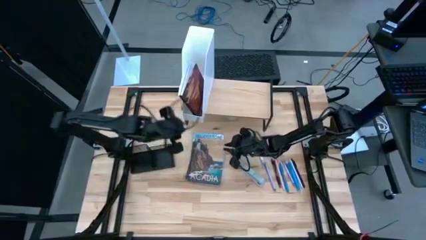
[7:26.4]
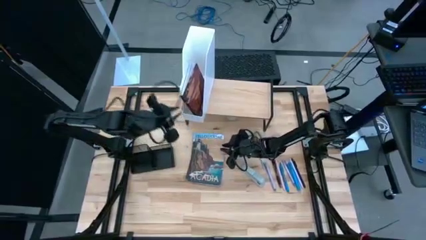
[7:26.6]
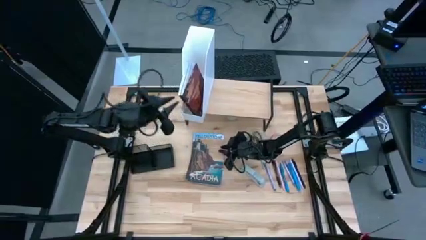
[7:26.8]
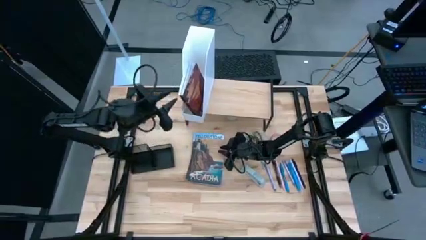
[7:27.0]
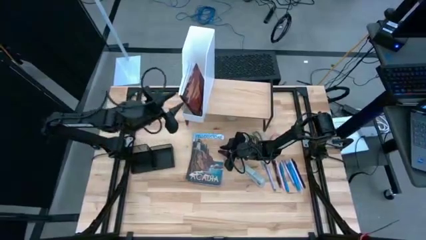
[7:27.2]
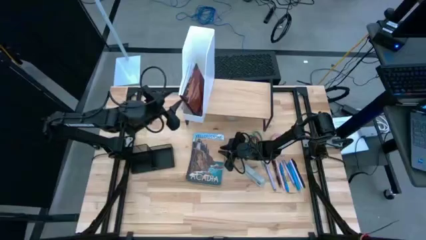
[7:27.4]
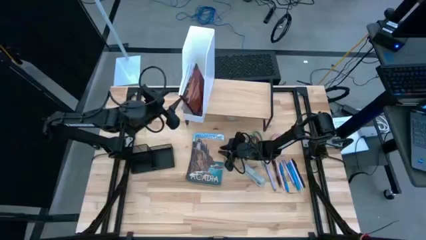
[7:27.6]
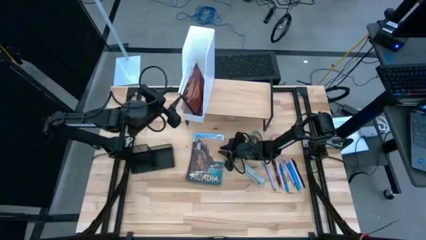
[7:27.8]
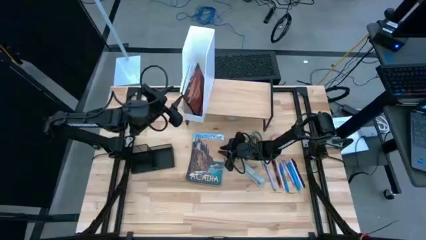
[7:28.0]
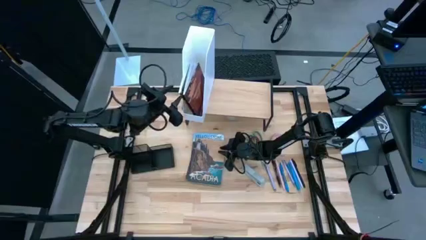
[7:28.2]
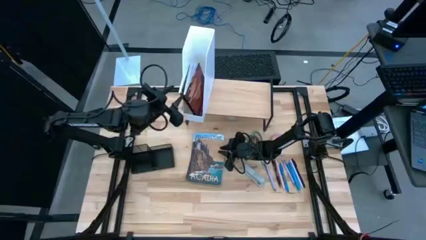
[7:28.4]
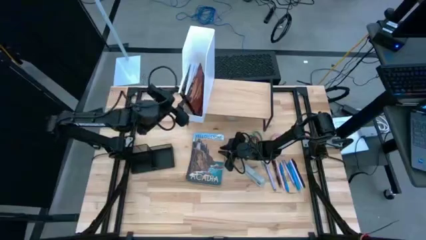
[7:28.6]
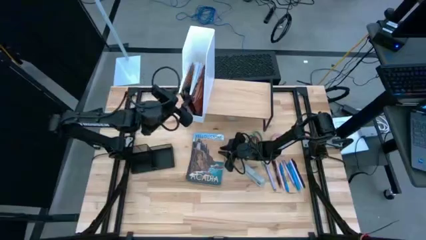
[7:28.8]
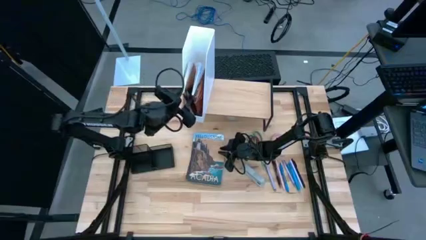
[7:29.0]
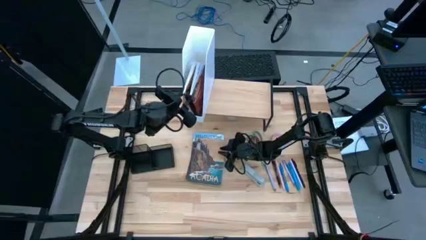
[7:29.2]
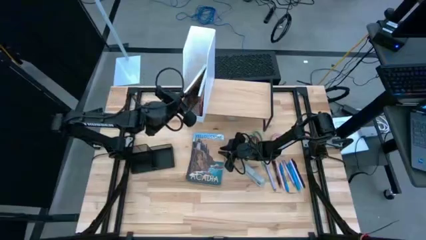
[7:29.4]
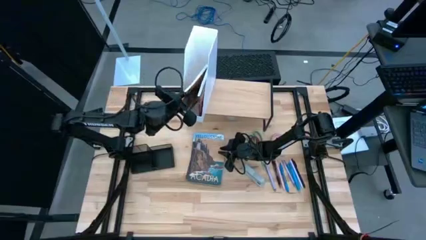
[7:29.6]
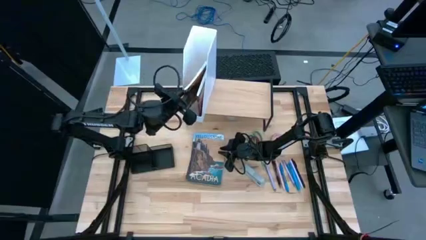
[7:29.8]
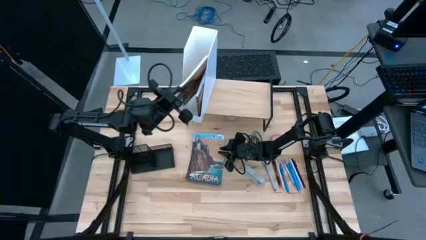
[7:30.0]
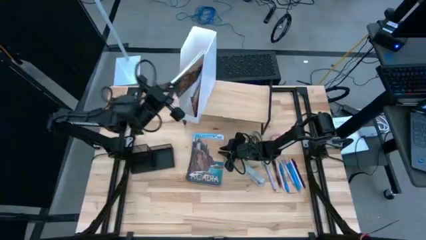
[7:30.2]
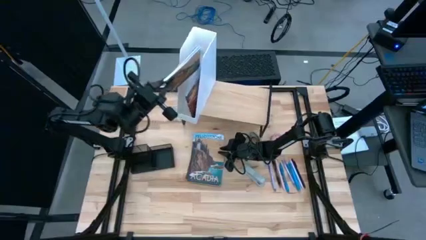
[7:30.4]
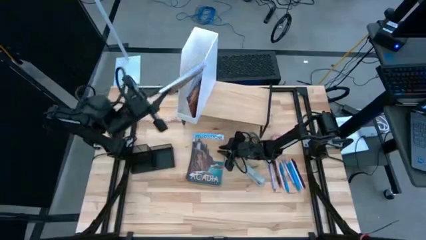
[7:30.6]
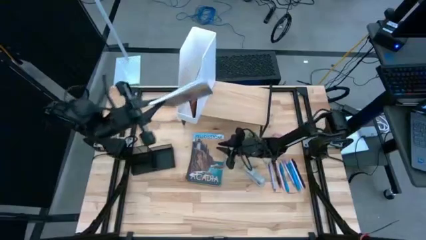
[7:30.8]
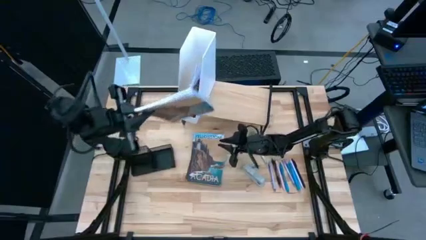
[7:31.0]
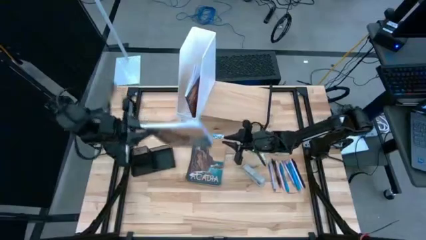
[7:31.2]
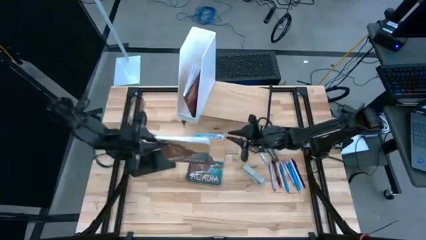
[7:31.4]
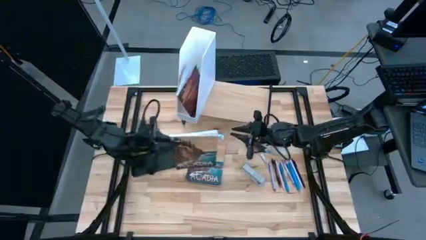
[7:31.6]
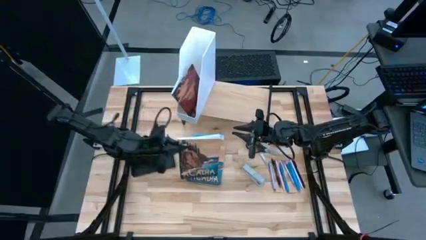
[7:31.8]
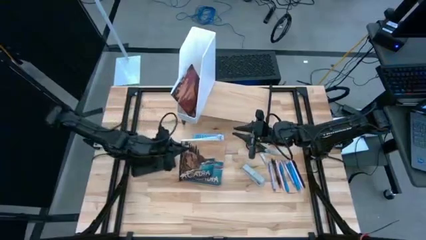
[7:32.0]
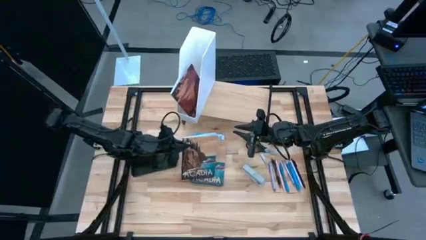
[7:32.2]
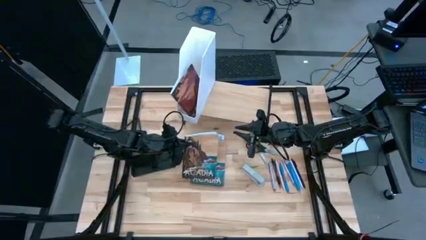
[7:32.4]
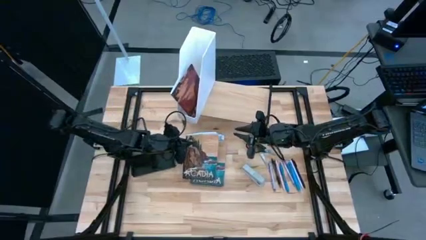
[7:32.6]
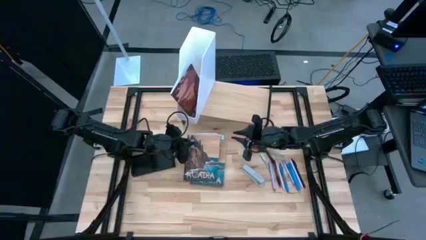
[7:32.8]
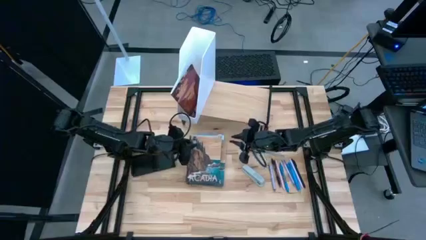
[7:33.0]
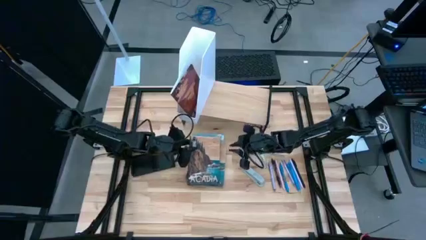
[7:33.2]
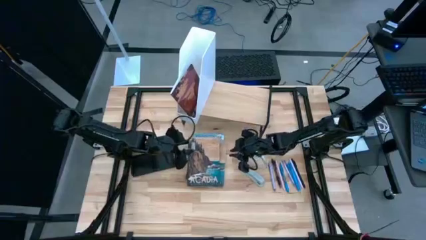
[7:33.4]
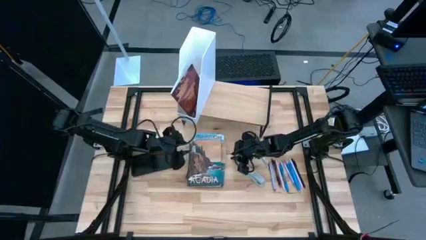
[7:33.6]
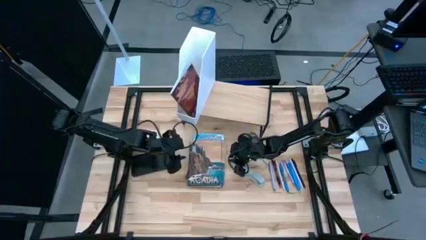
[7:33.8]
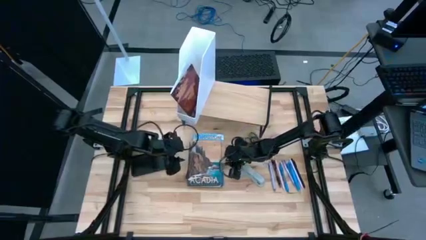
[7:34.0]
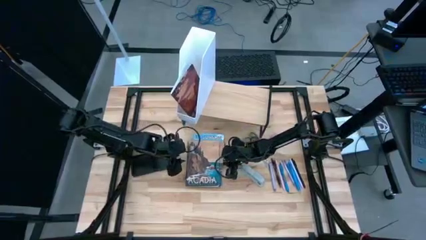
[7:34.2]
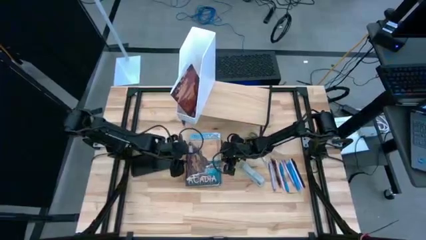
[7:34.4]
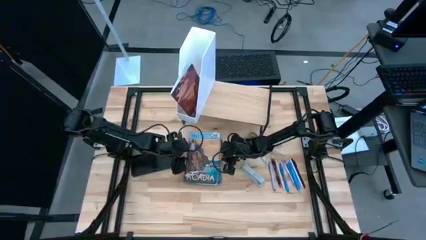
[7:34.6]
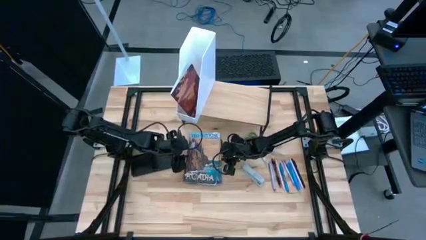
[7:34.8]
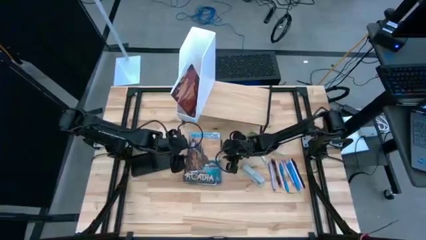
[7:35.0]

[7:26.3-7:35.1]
Task: Stock shelves
Remove the brown book from the white bookshelf on the shelf

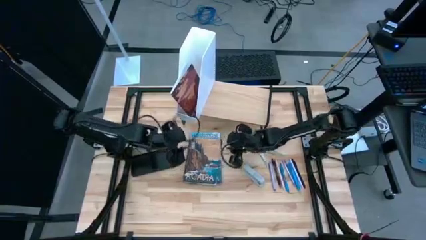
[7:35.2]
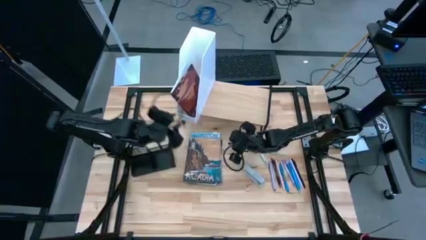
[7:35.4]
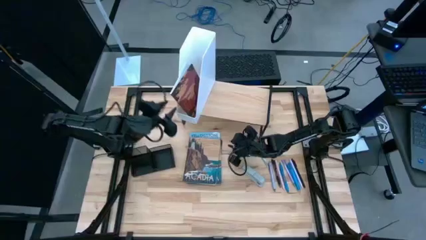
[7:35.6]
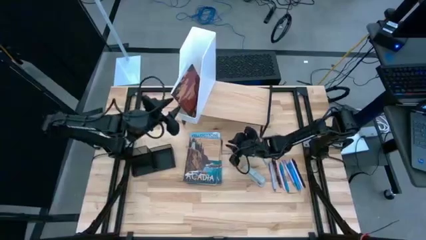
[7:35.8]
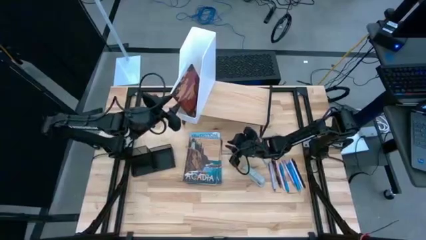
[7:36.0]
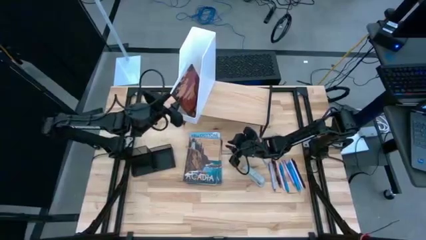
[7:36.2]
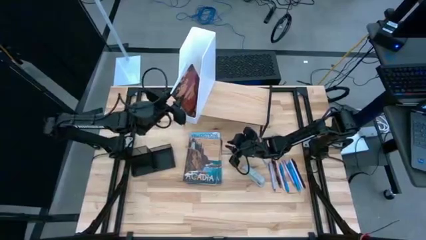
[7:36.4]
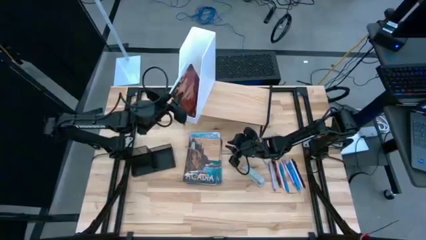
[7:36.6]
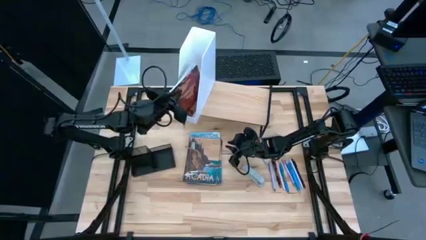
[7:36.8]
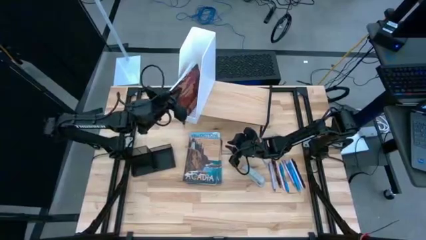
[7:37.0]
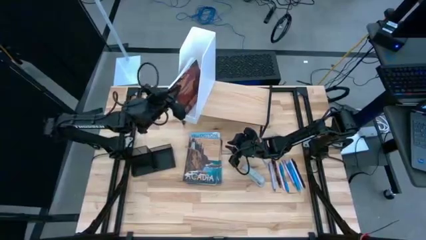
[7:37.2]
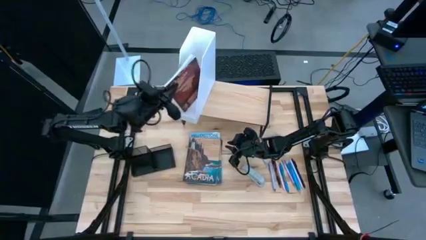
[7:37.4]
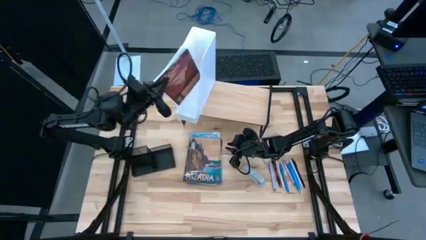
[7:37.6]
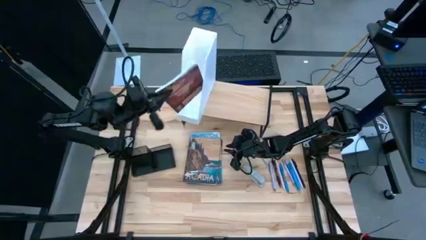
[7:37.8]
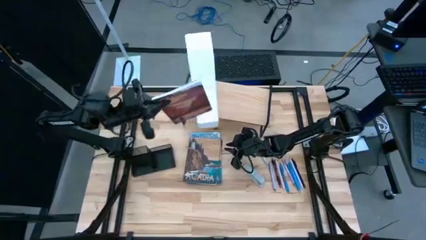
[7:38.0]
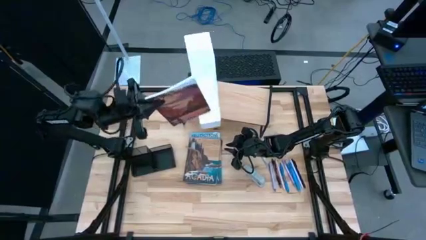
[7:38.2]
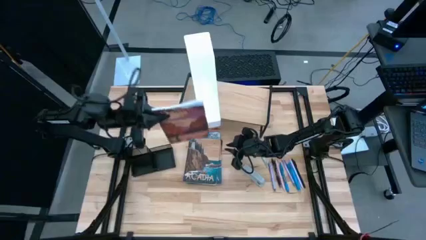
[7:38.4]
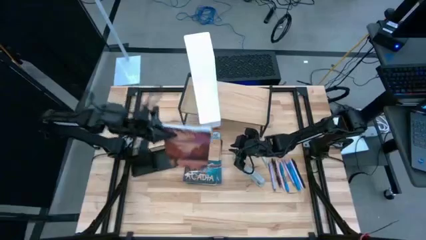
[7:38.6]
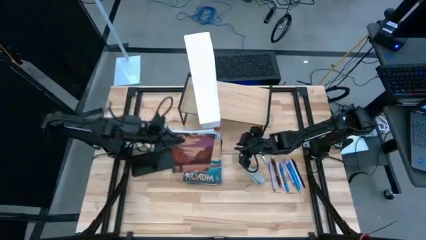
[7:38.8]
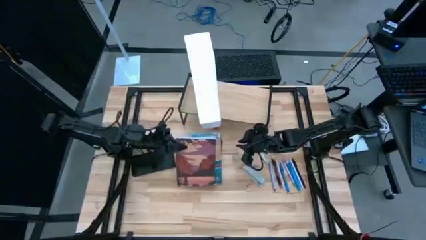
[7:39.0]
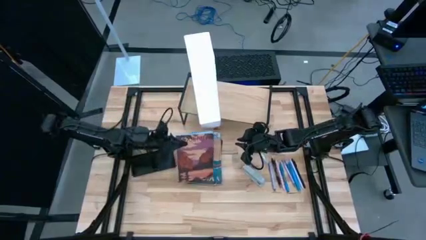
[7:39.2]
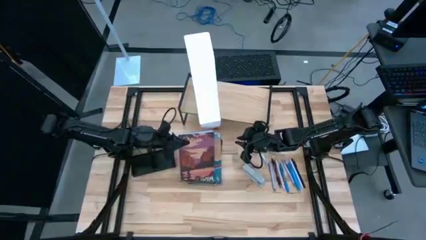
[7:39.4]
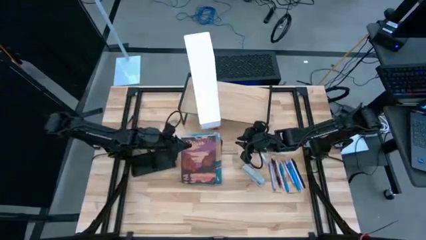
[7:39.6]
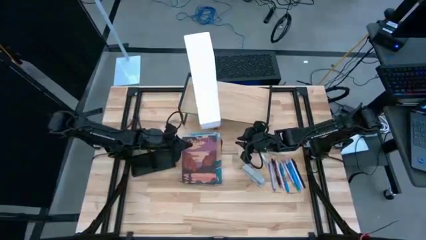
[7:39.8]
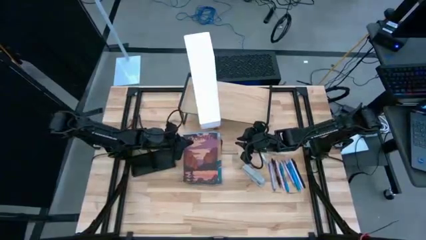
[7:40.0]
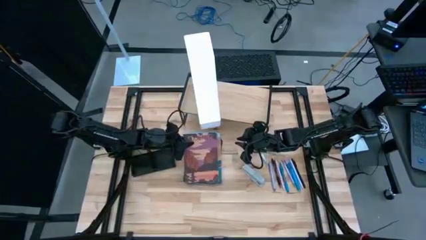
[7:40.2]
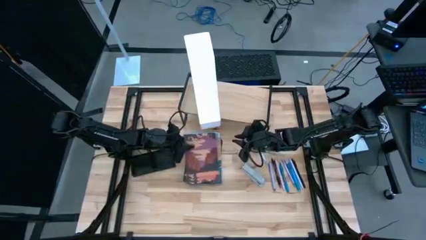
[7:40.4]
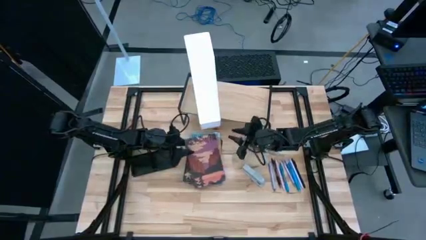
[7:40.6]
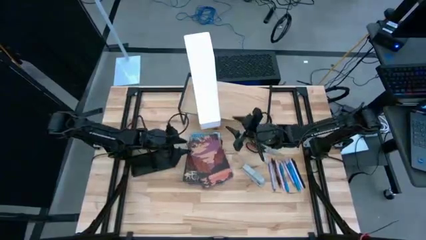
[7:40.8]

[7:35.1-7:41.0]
Remove the purple book from the white bookshelf on the shelf
